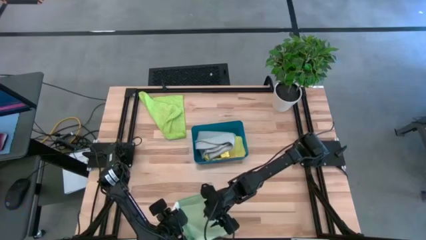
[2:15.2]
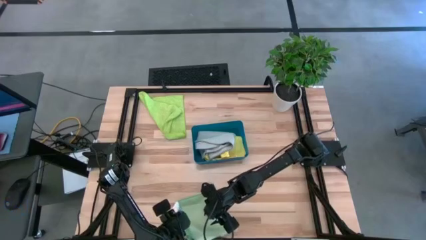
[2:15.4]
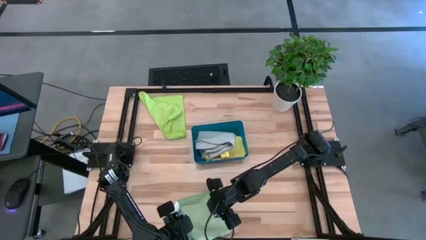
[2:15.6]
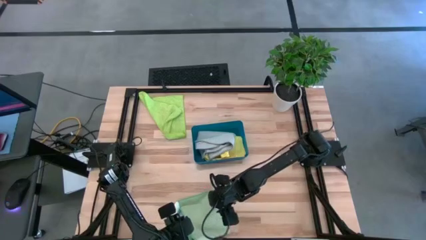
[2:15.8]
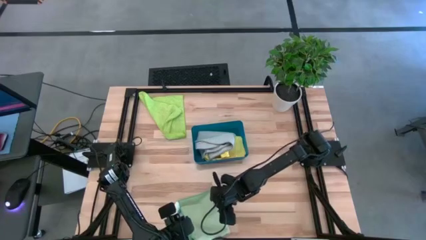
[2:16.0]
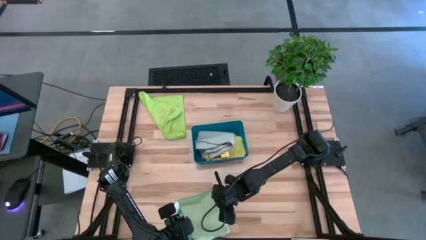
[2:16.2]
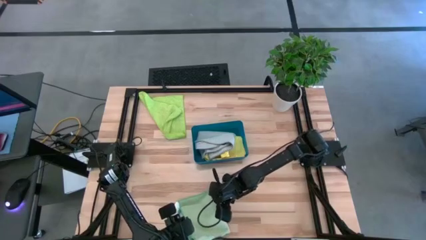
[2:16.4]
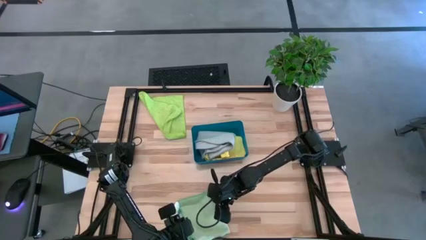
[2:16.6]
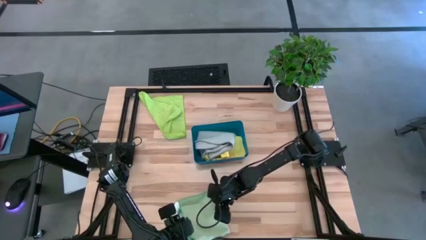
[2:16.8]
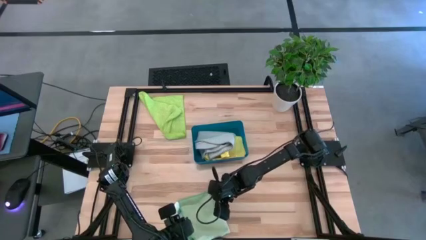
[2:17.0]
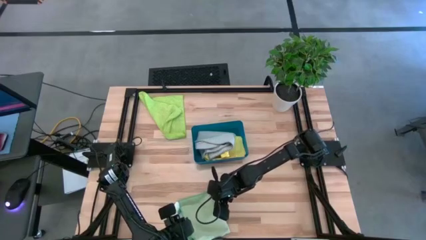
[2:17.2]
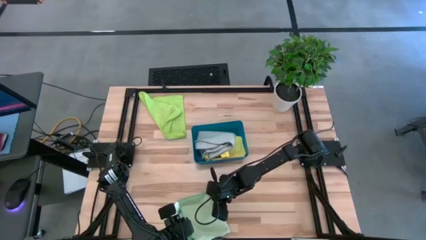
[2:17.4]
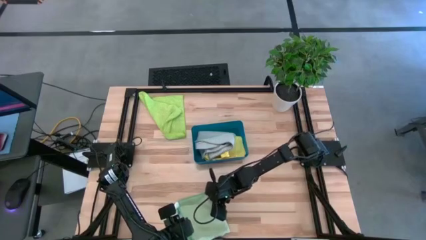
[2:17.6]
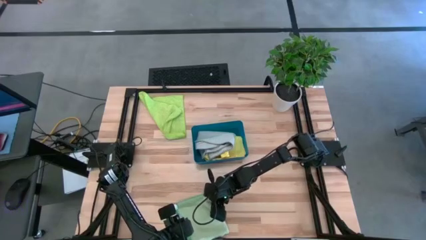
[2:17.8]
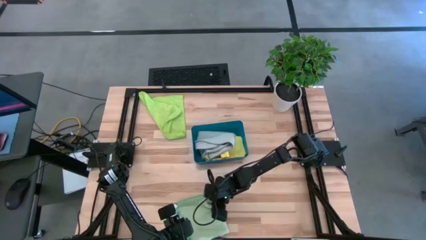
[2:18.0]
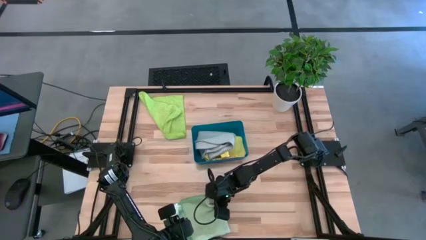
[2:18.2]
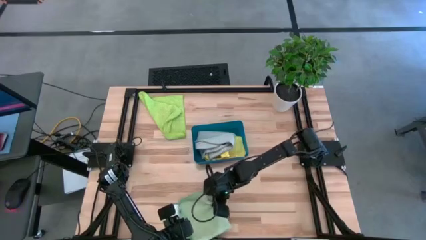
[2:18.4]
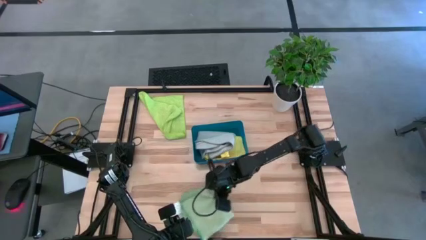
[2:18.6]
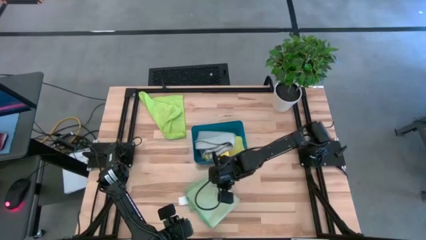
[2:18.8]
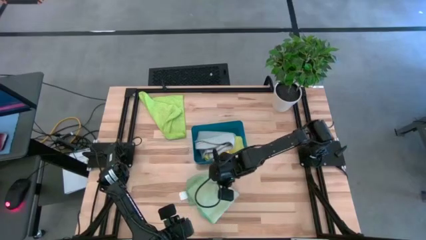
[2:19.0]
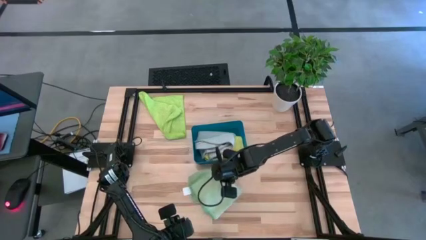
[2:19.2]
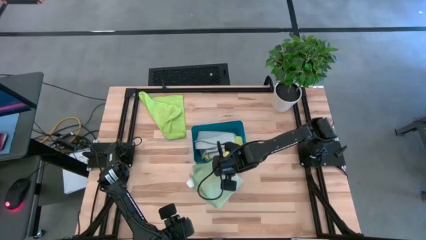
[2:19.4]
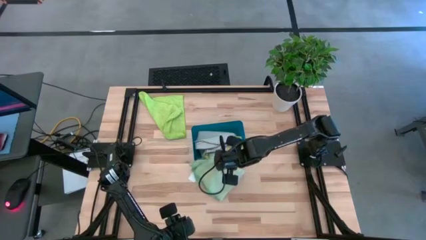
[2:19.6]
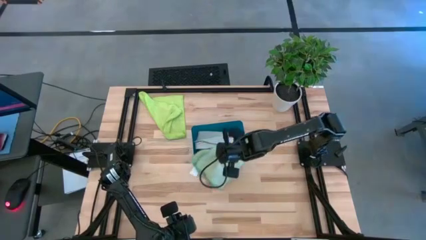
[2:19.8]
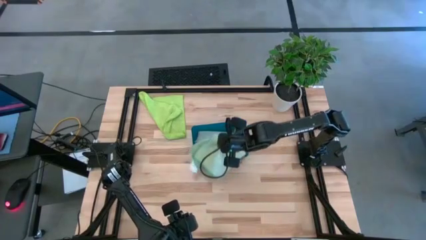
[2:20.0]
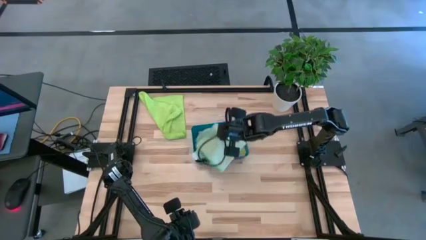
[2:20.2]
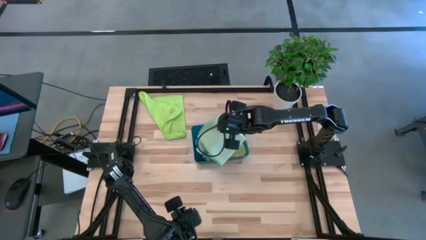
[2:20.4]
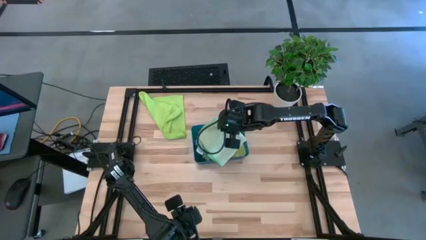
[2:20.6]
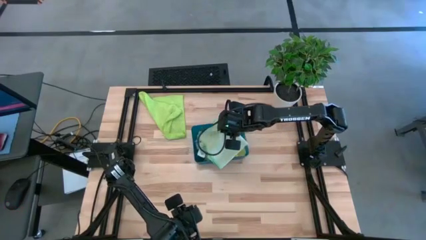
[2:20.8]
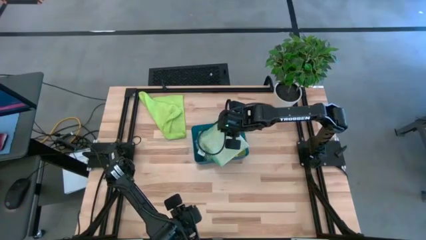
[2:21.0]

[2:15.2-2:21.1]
Task: Fold microfiber towels
Put the folded light green microfiber towel into the blue bin

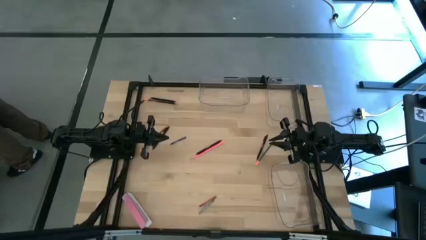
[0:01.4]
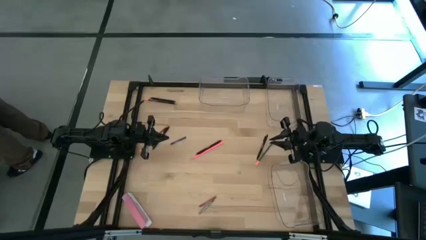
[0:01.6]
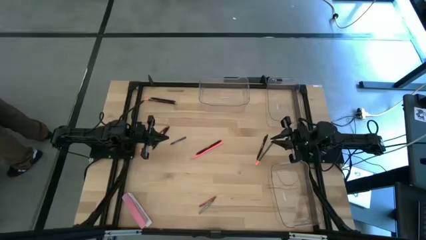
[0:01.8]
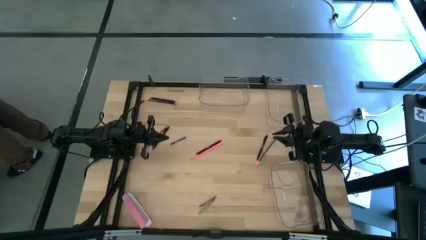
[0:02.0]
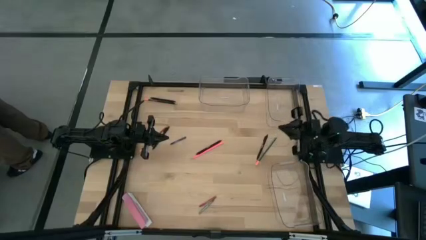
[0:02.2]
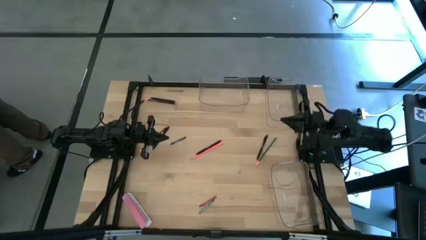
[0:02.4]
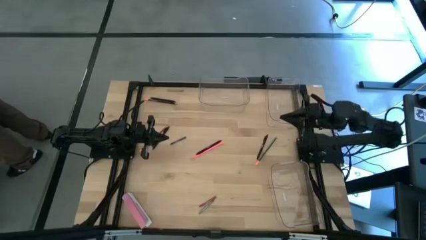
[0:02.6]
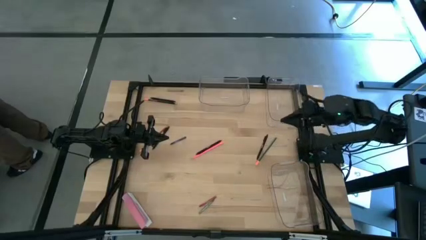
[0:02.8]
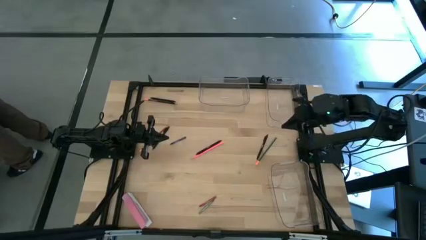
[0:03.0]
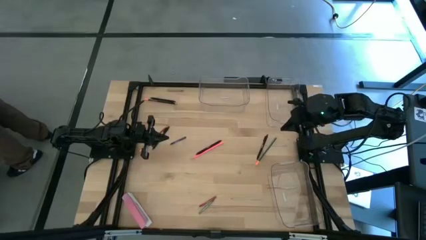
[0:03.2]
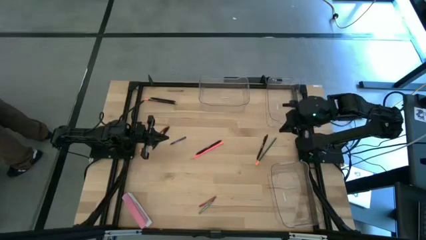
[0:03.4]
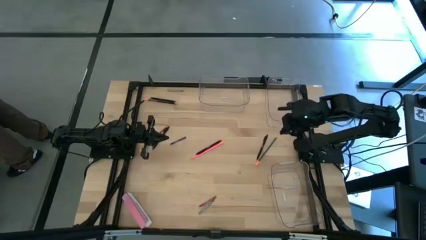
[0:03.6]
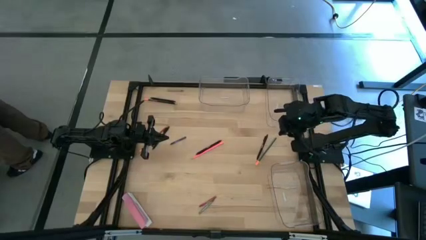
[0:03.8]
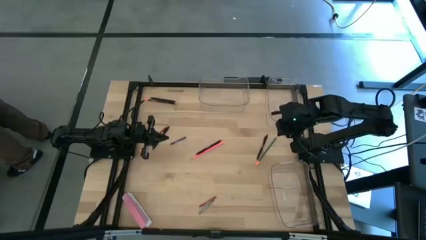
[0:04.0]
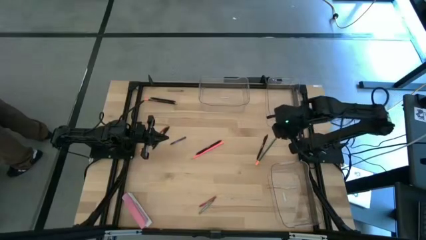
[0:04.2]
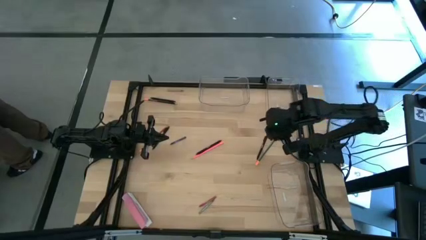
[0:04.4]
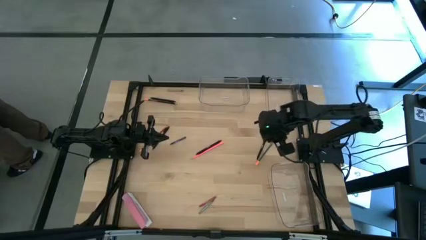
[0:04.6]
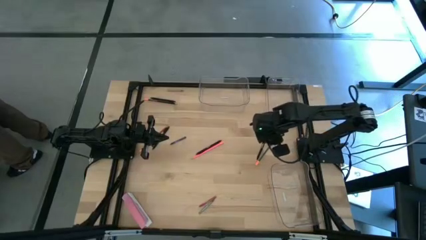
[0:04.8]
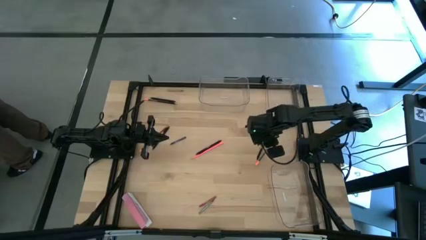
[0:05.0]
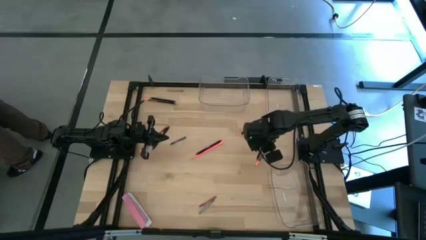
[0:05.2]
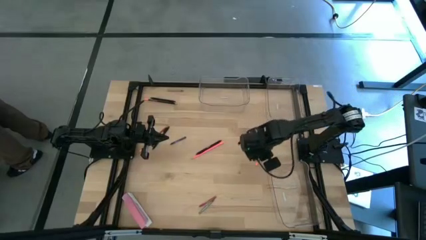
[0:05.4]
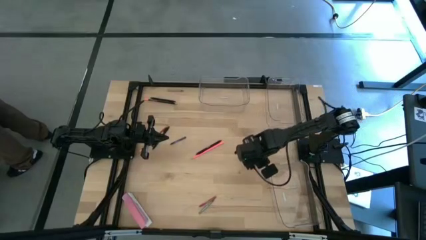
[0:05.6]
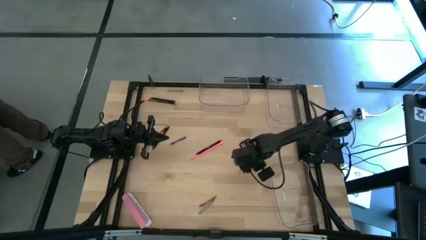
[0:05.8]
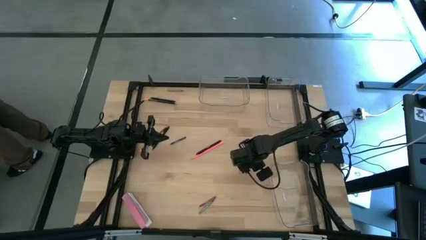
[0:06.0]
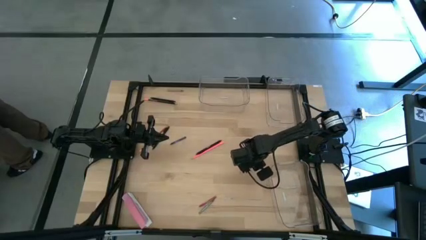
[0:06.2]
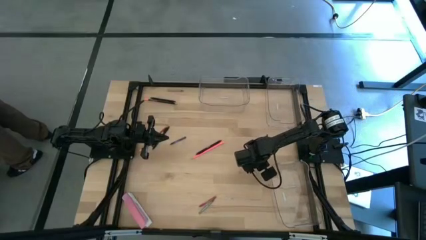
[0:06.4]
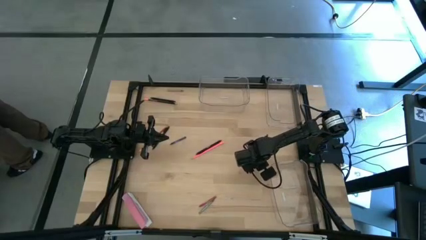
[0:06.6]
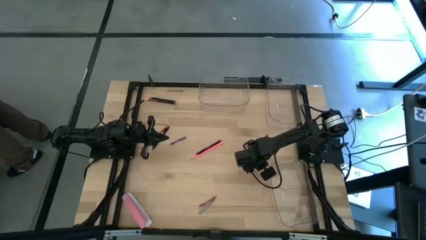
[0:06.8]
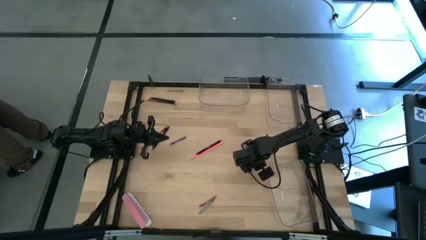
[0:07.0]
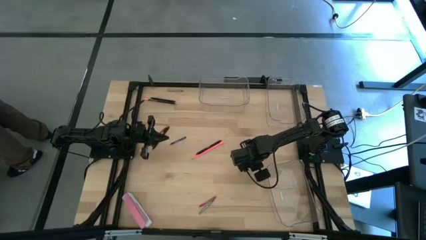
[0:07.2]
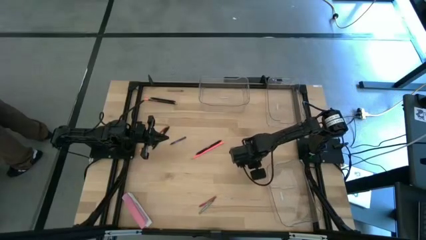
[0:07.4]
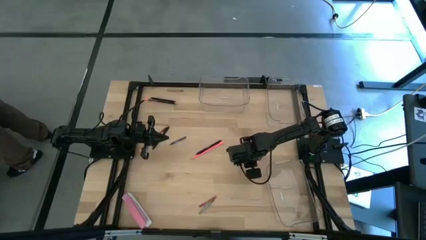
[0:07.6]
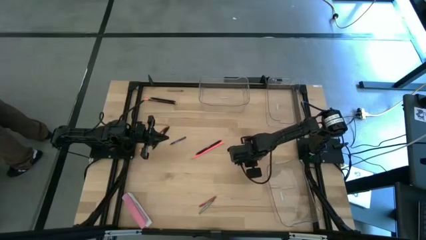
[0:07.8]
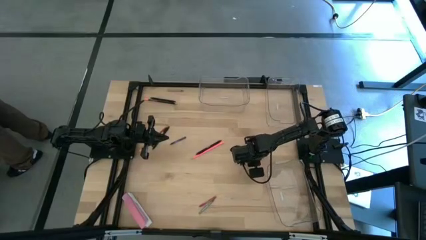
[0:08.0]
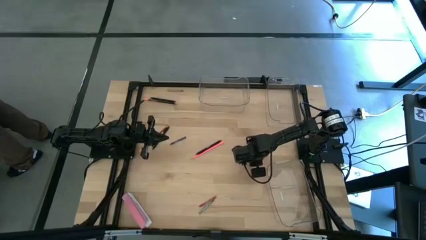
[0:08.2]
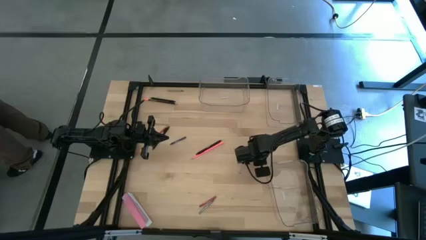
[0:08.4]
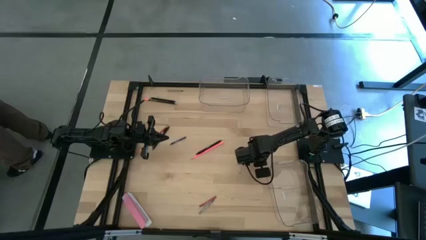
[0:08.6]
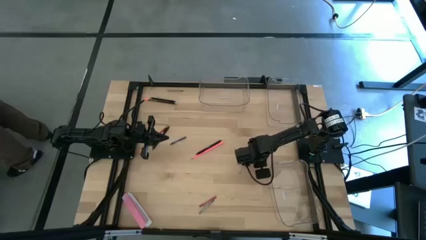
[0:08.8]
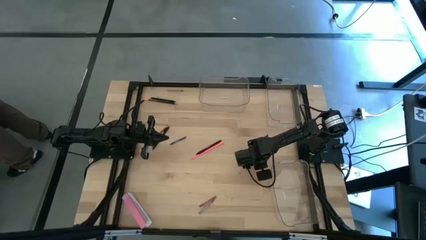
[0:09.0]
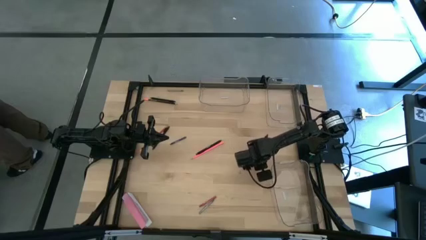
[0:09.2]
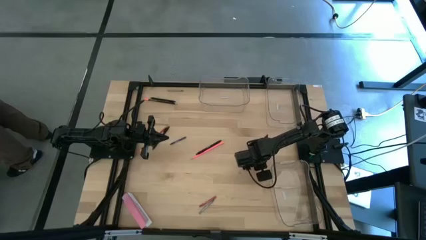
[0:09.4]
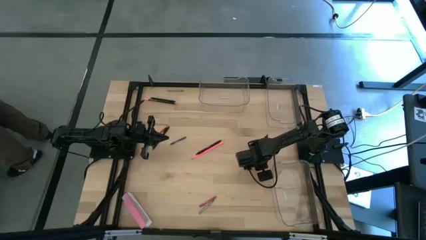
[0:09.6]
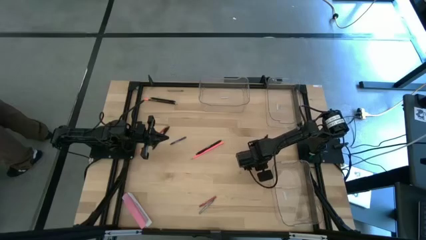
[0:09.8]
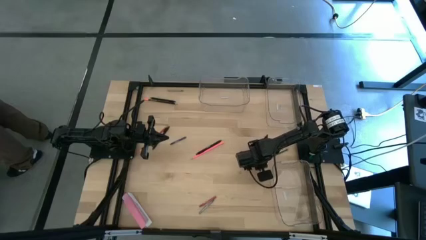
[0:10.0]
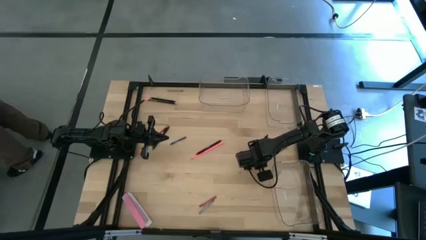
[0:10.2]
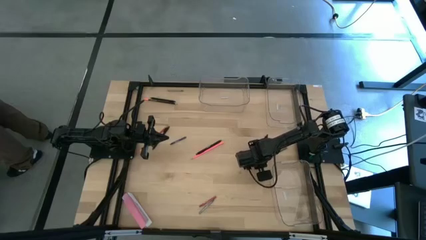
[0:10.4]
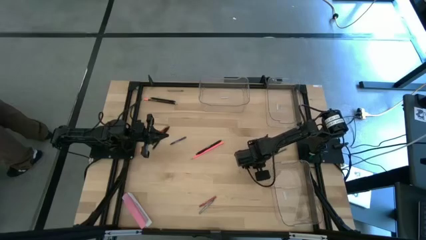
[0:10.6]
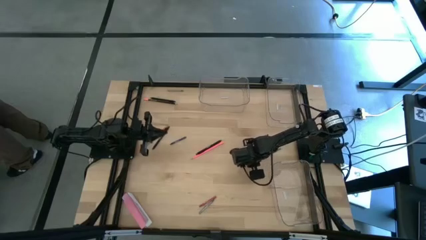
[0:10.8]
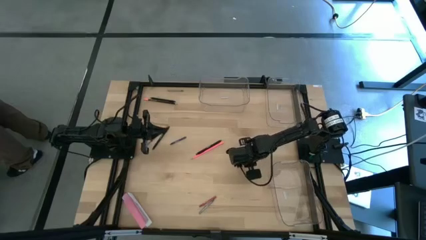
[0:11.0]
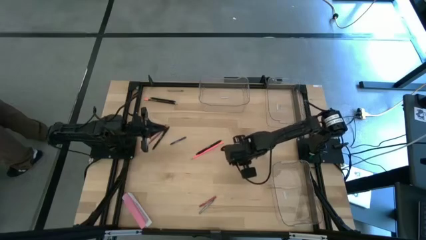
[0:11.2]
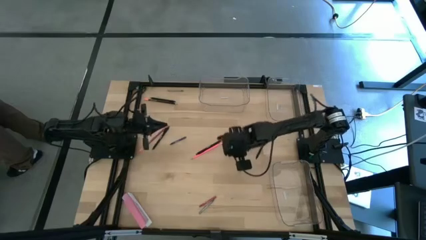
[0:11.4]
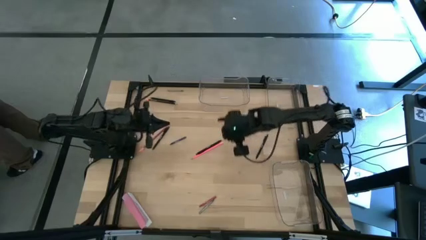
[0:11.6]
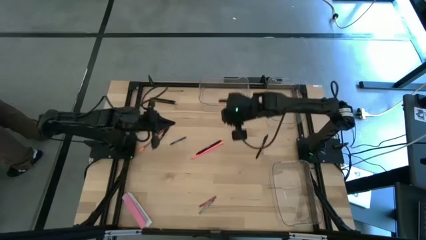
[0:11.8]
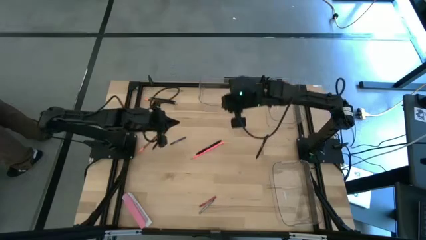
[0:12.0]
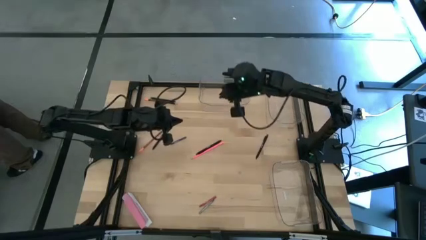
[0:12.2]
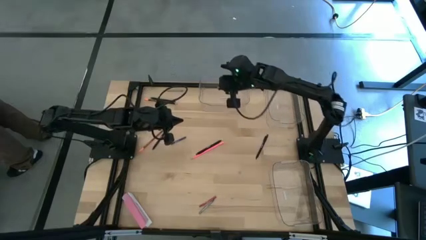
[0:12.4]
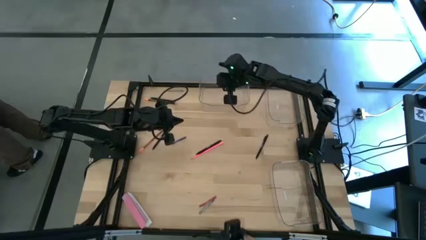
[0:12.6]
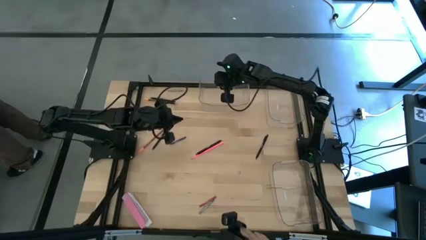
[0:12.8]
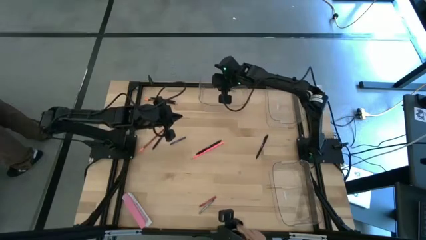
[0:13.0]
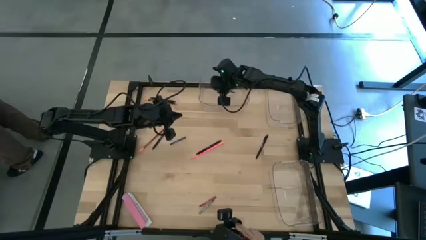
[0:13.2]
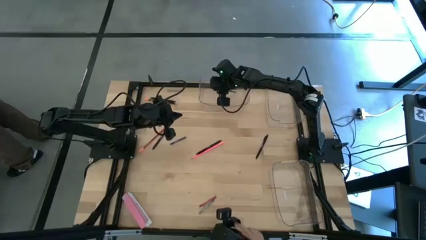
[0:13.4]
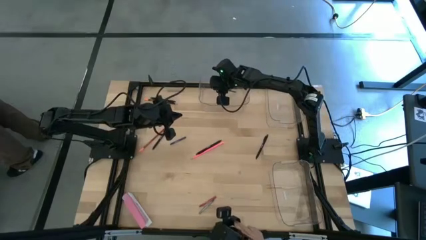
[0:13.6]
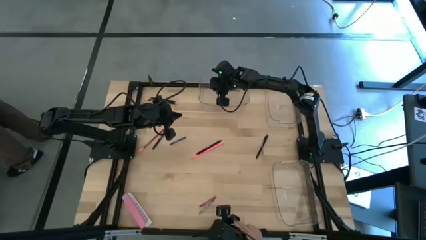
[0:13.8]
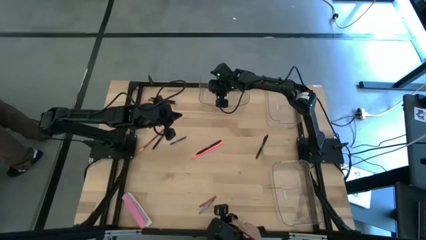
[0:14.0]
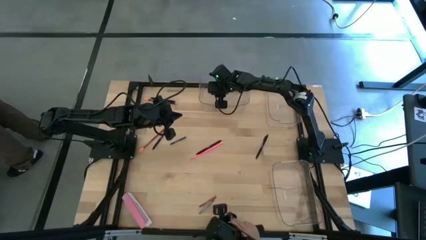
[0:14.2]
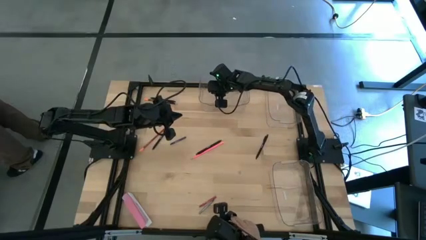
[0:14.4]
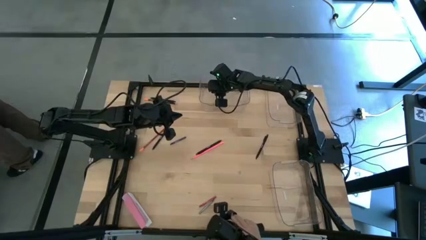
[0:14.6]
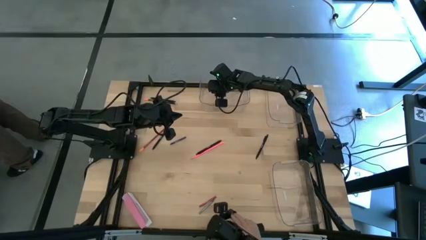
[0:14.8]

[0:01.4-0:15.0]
Task: Sort crayons/erasers/pens/pencils in bins
Put the green pencil into the top left transparent bin
